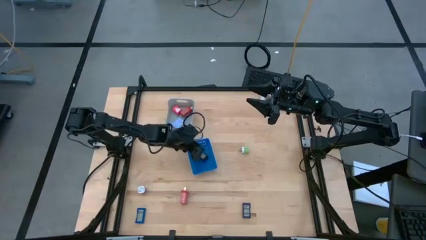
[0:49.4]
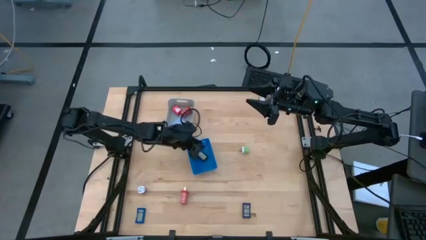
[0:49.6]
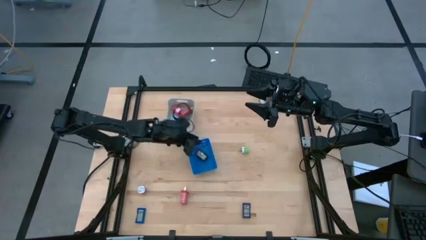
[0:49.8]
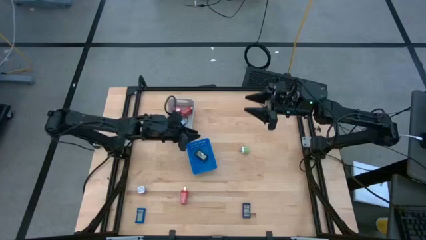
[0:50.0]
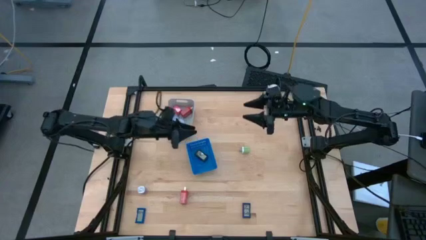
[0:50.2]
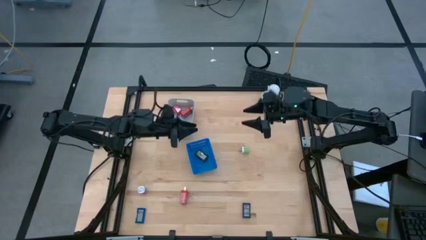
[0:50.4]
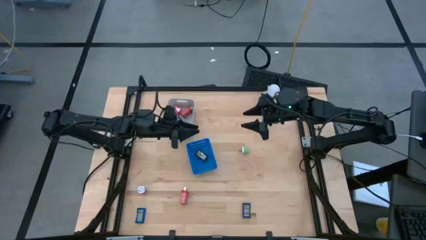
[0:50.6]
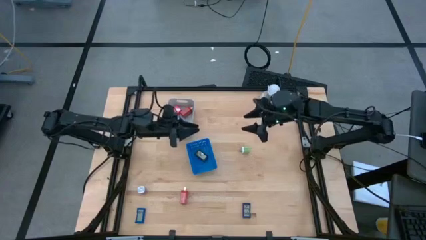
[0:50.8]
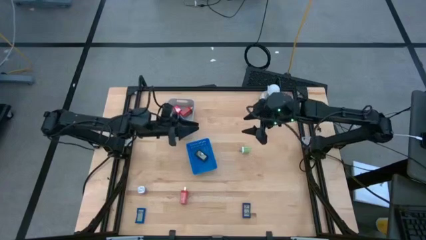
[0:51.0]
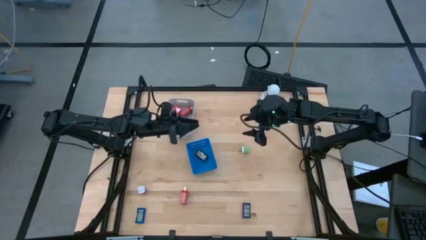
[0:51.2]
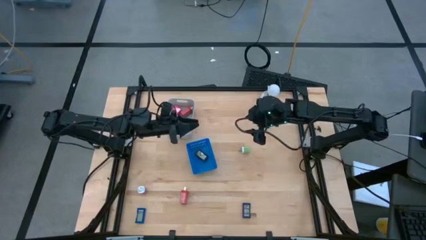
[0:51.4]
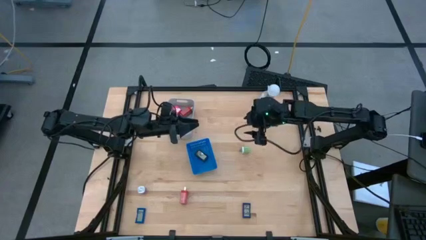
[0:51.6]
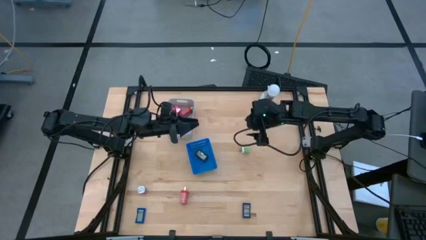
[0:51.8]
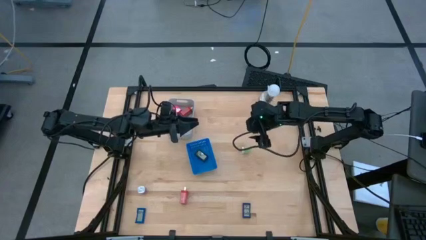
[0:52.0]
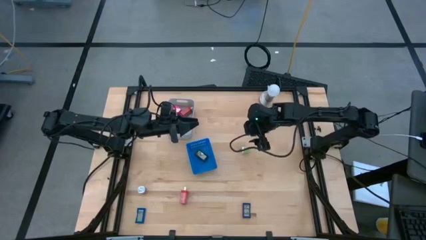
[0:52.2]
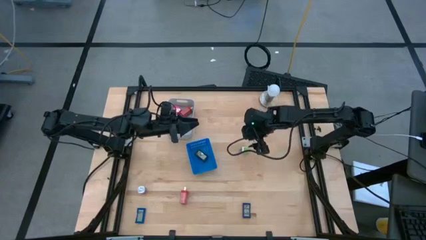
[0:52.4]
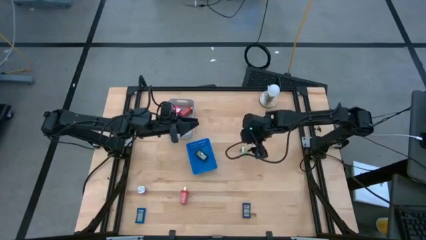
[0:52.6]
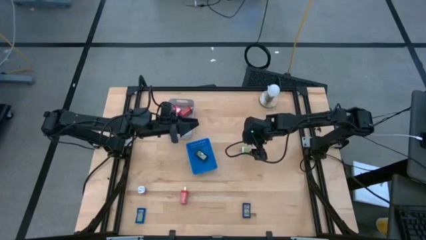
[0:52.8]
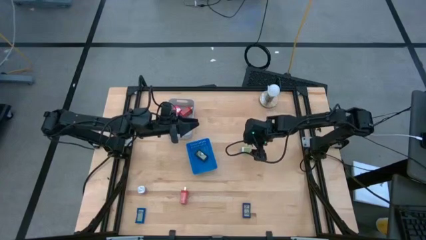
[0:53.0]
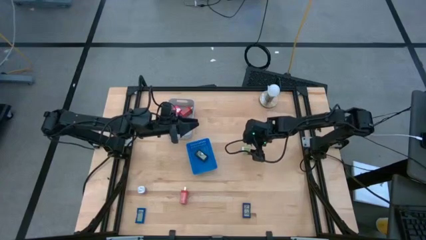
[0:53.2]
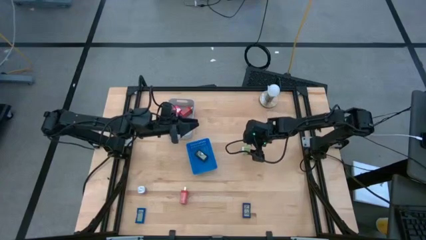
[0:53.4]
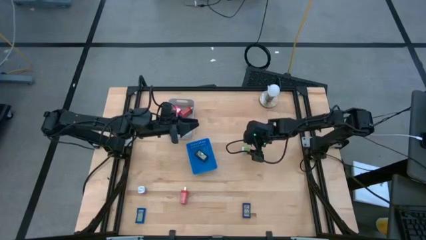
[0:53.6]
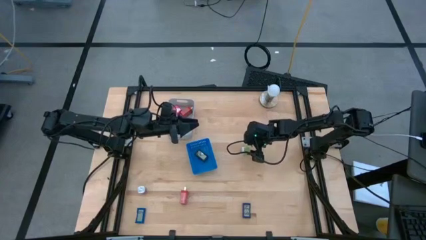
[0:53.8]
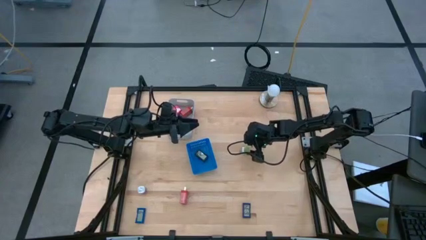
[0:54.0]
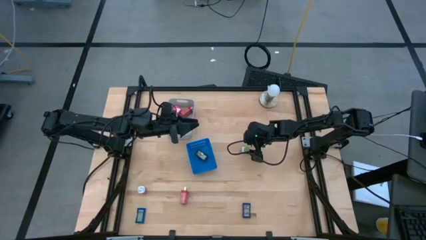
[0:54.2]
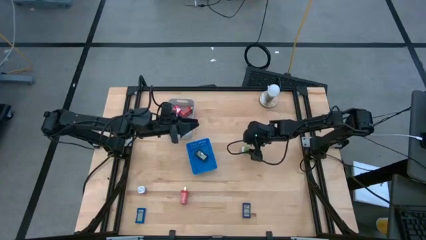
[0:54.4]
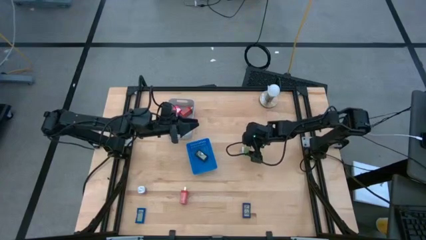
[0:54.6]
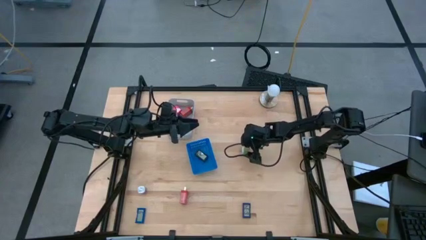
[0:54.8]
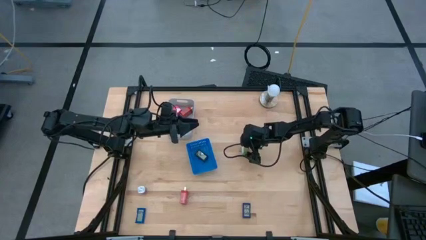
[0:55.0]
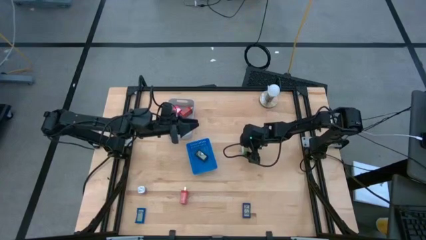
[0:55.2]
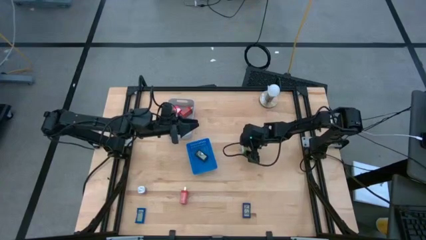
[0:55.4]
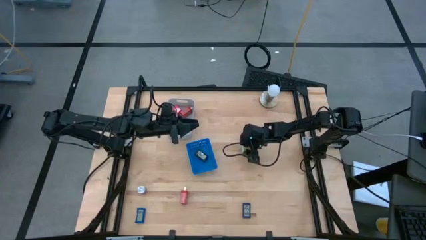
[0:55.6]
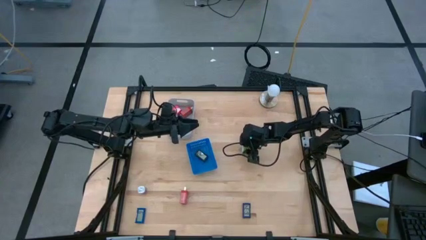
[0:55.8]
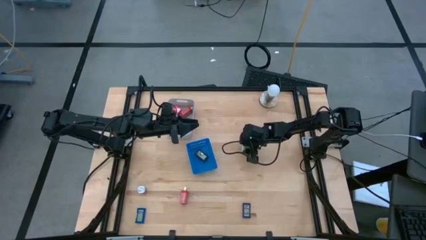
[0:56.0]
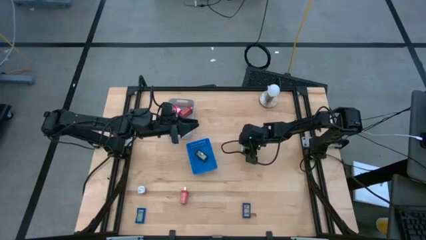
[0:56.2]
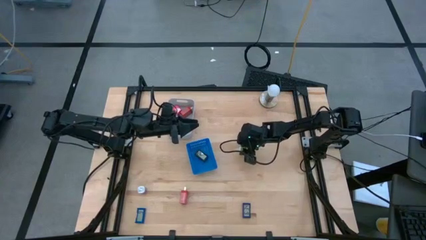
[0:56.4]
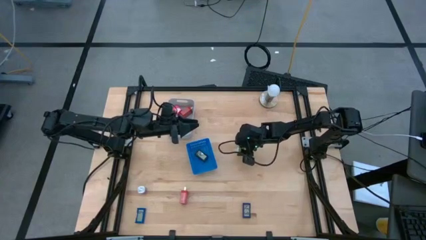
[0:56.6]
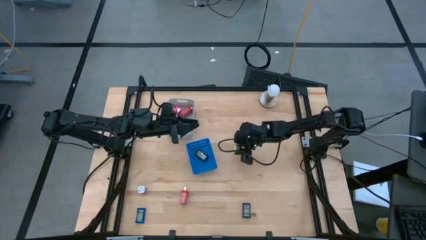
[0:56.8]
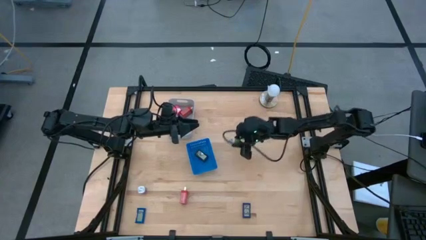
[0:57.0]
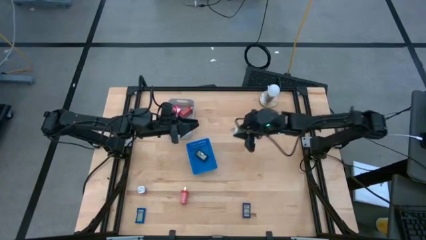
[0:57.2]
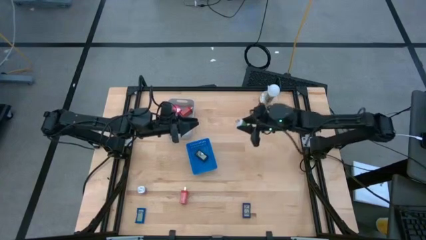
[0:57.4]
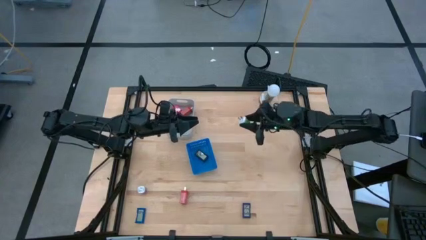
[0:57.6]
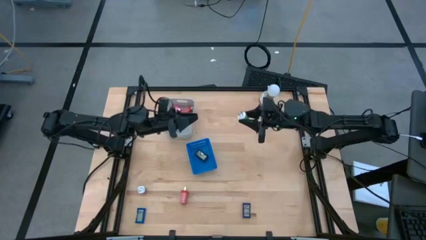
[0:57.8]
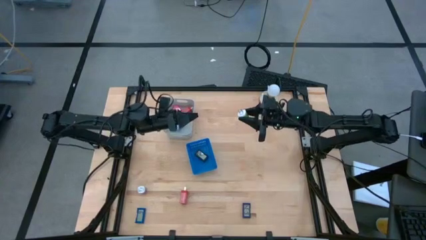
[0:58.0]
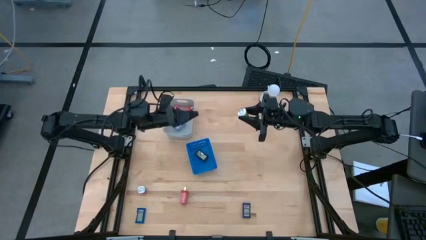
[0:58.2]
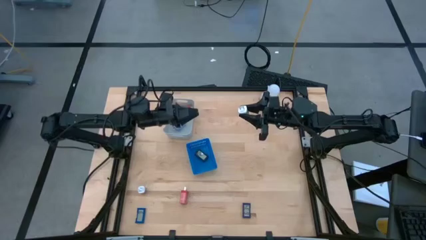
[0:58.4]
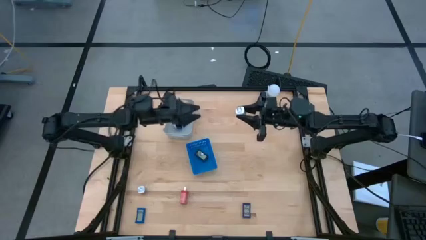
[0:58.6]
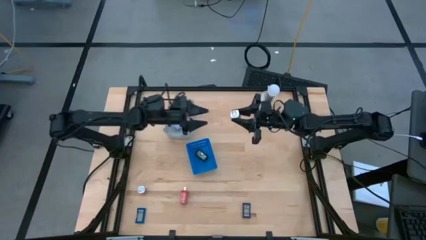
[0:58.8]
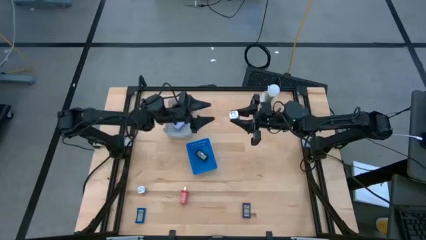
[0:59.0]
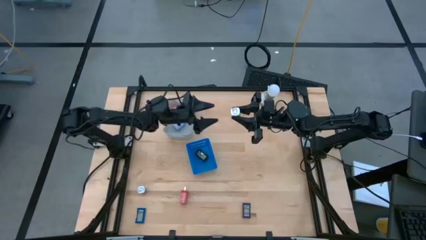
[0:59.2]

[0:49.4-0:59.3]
Task: Pick & Place Office items
Put the green charger adapter into the gray bin

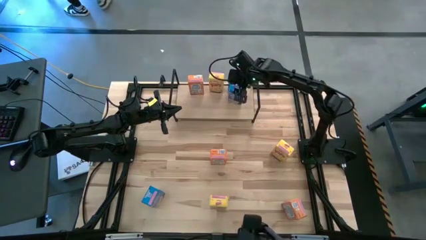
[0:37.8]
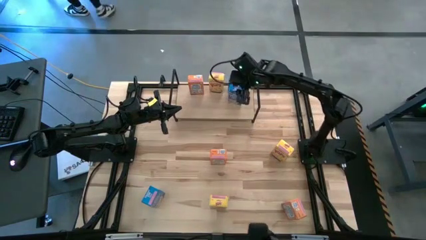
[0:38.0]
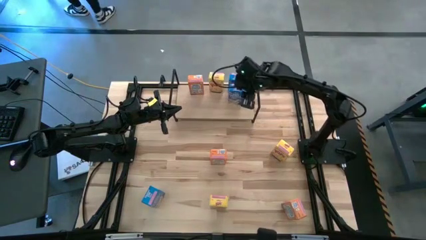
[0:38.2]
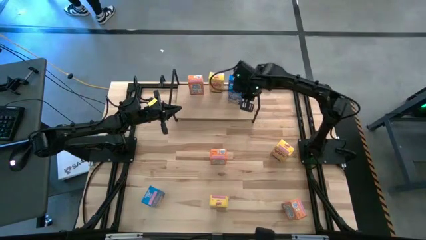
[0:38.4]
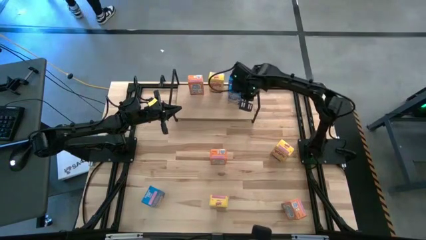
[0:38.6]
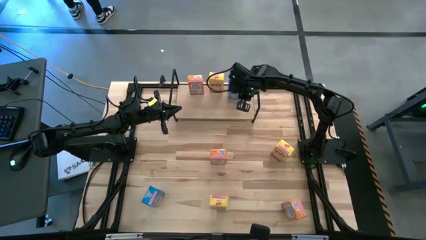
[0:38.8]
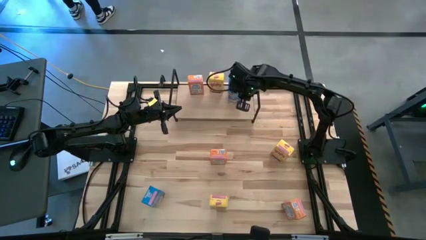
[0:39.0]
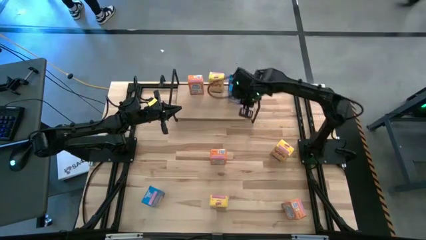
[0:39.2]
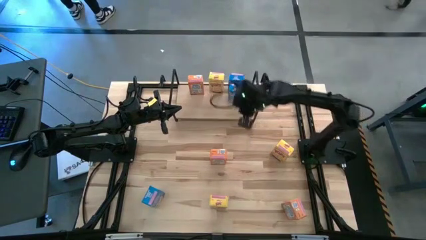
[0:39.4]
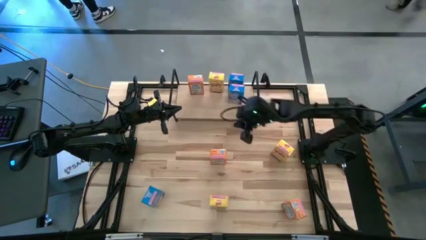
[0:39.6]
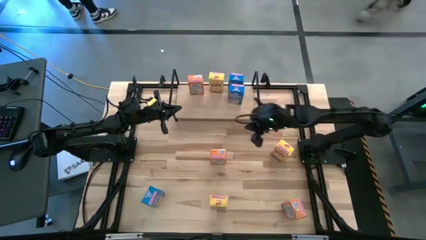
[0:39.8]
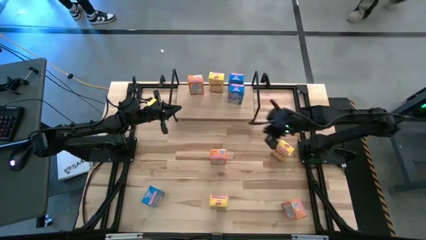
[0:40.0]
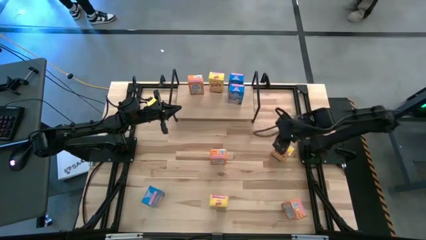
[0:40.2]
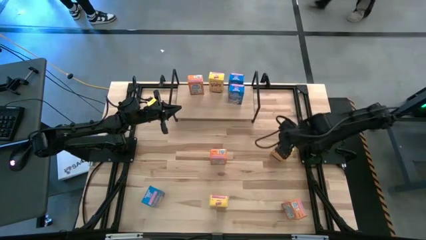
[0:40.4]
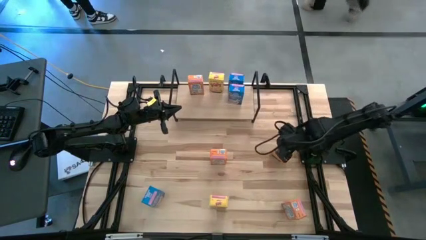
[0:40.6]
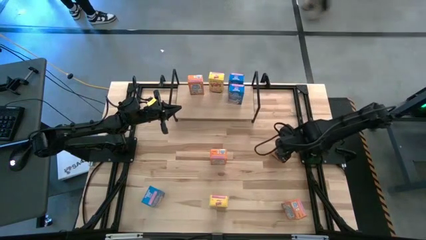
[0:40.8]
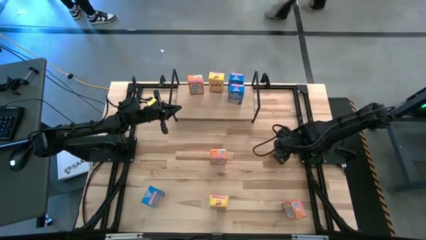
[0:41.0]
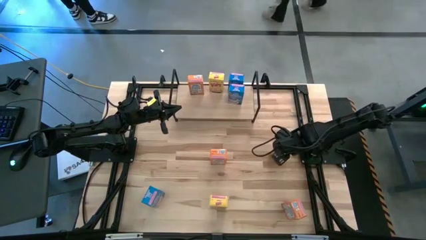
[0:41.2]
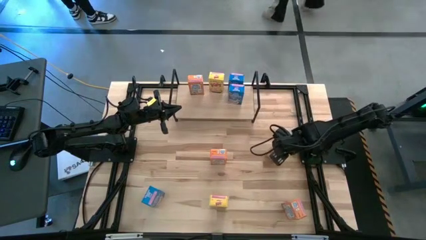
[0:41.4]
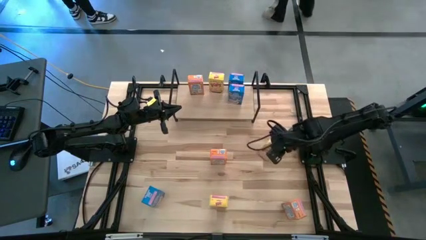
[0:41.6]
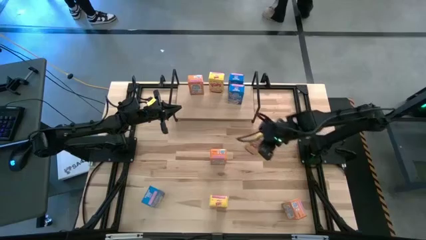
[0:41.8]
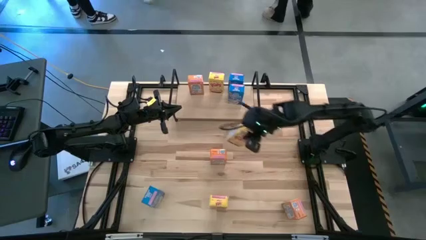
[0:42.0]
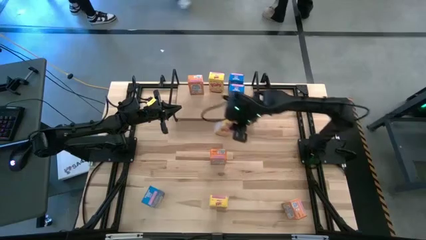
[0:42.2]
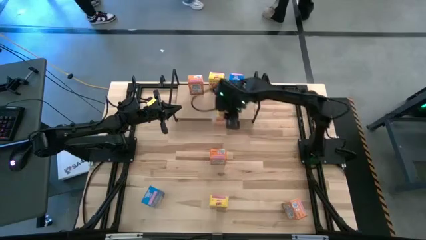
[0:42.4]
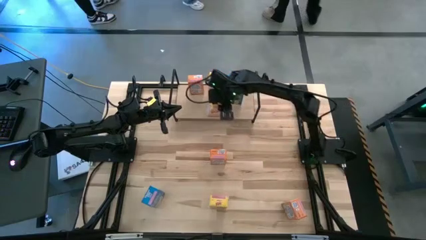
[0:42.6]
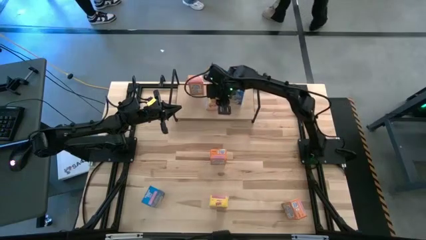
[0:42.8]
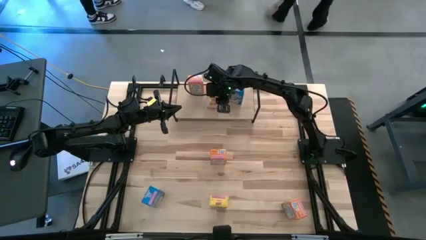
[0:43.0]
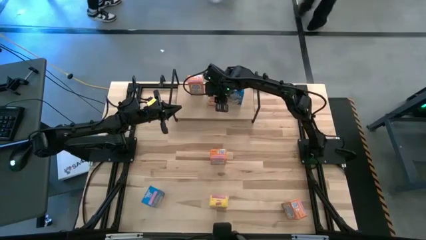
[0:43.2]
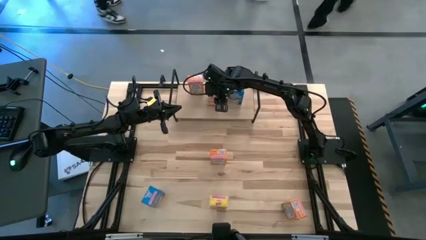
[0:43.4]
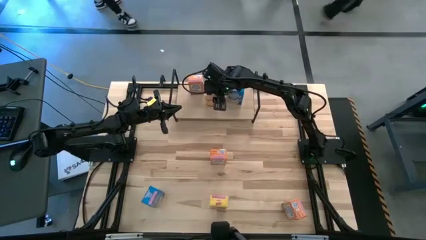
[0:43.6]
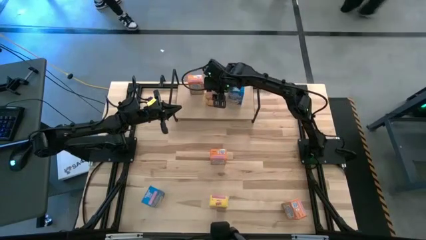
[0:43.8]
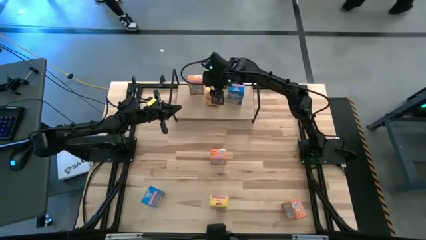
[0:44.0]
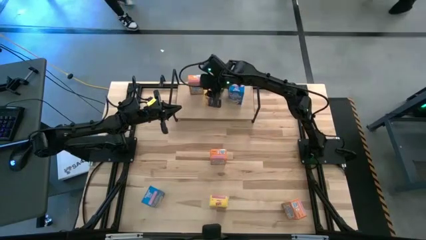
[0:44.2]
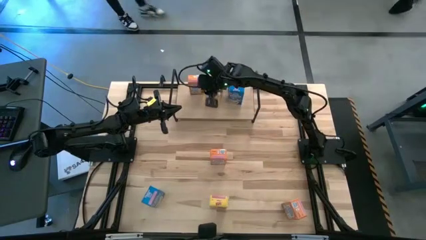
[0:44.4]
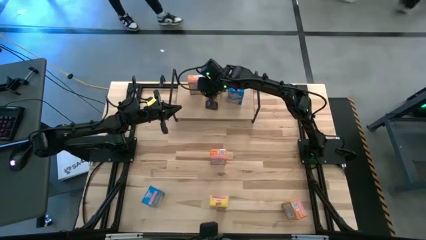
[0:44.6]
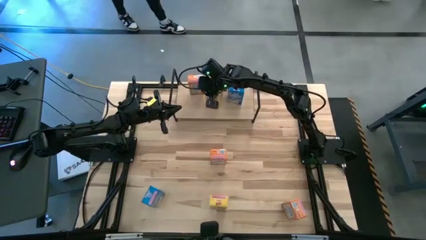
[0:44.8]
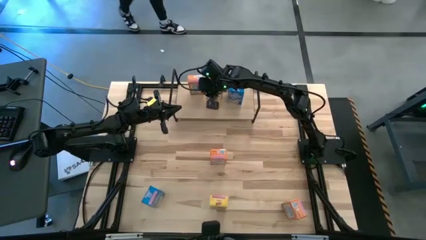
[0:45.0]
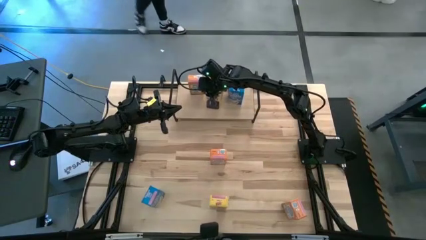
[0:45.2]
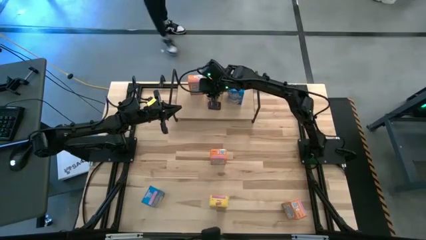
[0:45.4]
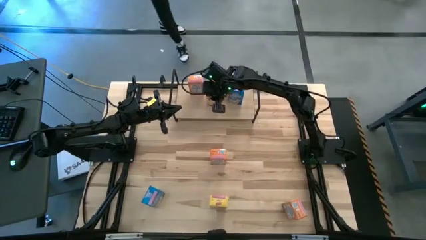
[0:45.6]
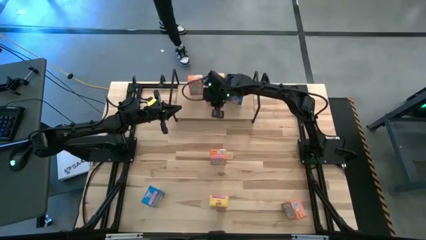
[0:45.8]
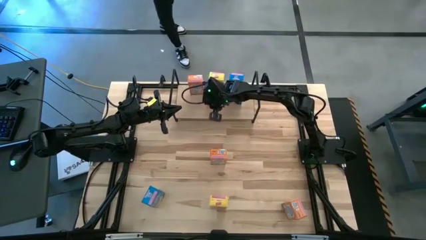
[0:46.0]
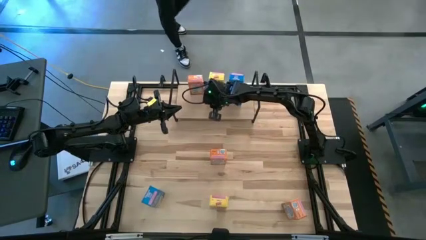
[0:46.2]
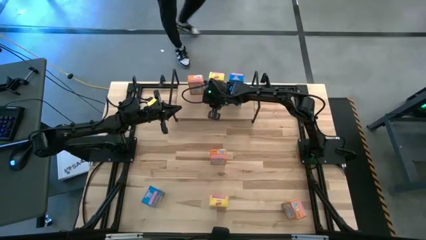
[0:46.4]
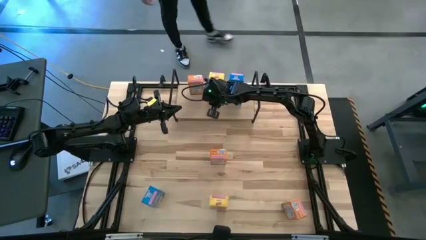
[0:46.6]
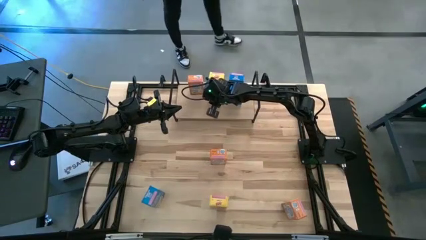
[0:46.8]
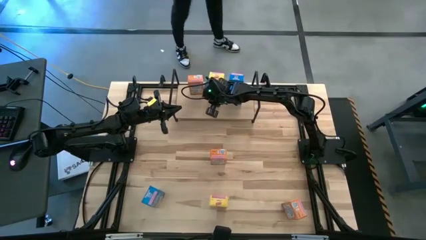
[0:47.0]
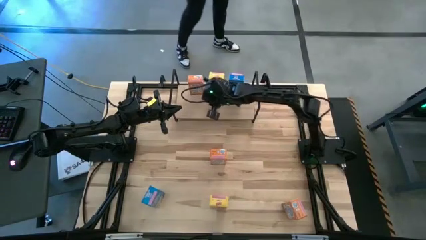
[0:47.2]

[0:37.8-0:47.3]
Task: Stack cereal on shelf
Put the top cereal box on the shelf aligned with the other yellow cereal box
